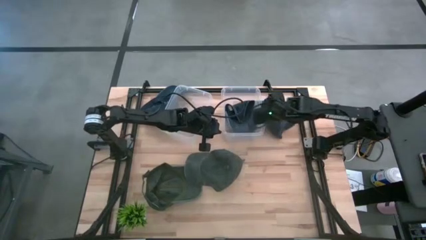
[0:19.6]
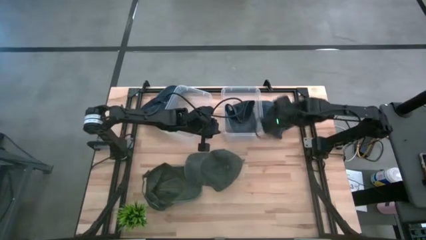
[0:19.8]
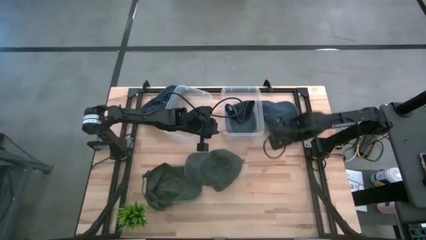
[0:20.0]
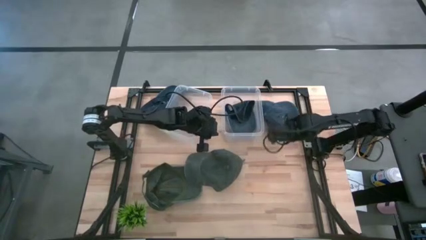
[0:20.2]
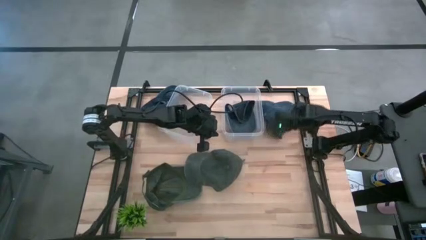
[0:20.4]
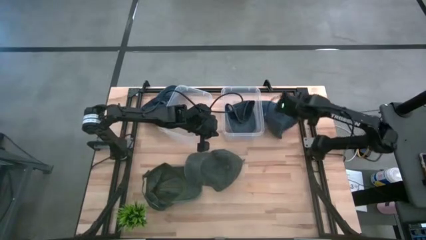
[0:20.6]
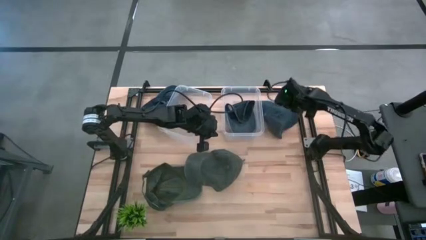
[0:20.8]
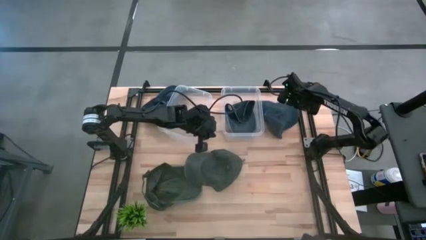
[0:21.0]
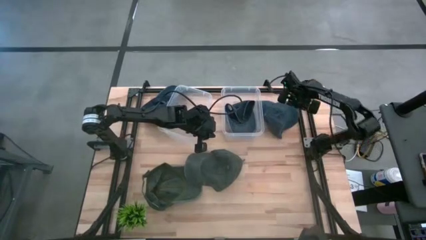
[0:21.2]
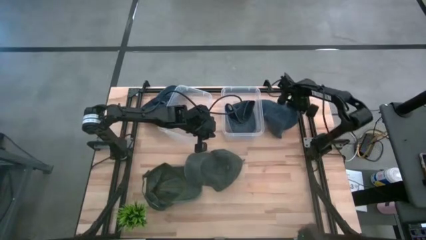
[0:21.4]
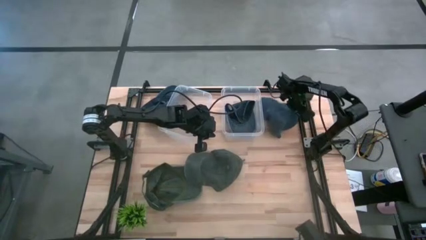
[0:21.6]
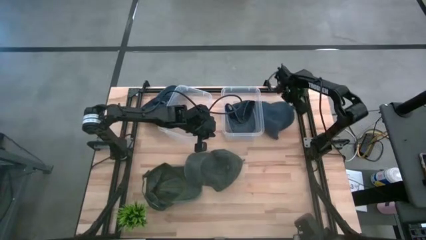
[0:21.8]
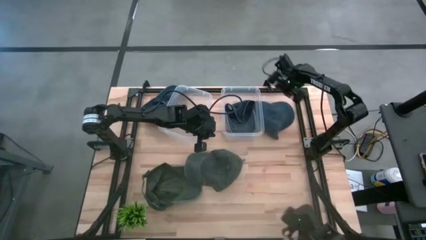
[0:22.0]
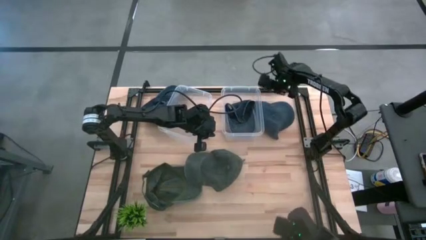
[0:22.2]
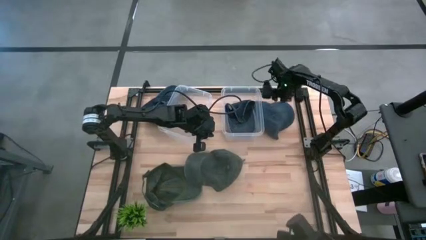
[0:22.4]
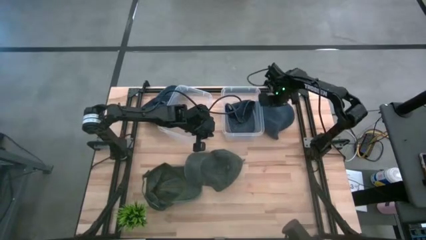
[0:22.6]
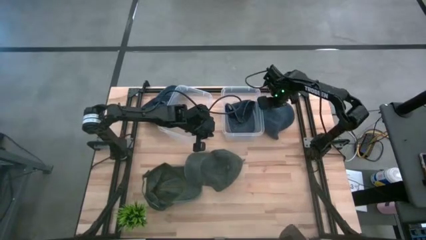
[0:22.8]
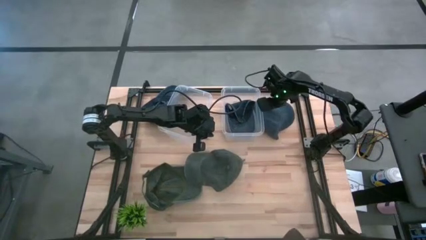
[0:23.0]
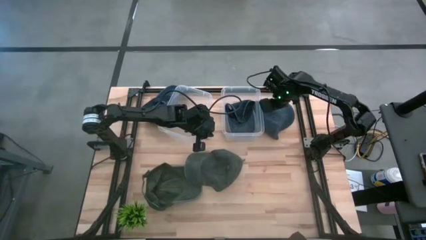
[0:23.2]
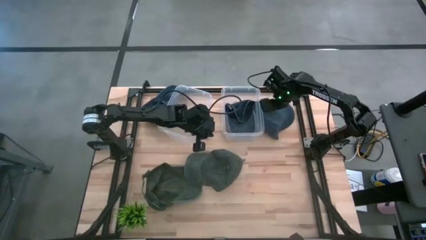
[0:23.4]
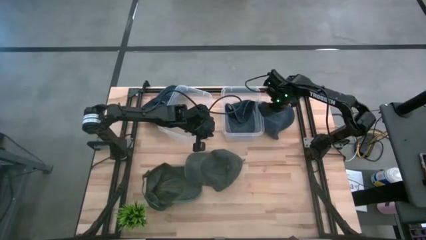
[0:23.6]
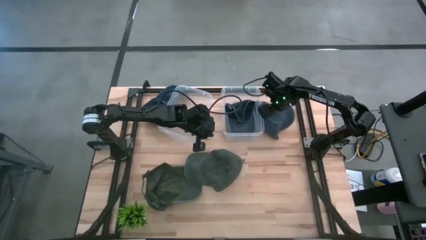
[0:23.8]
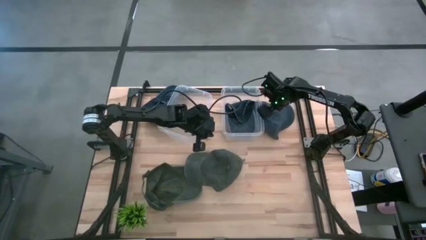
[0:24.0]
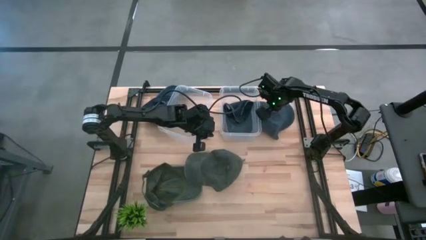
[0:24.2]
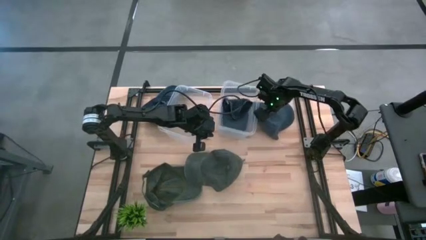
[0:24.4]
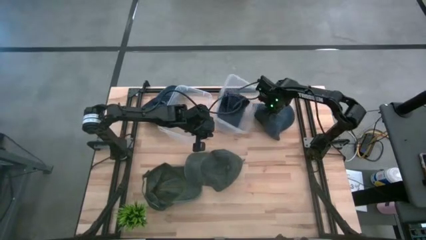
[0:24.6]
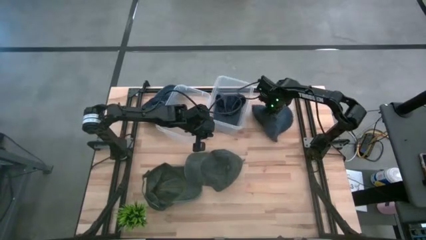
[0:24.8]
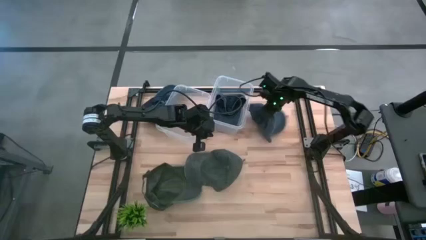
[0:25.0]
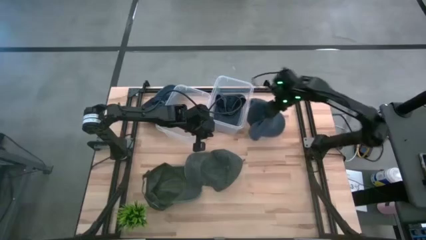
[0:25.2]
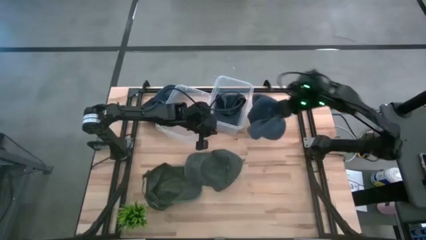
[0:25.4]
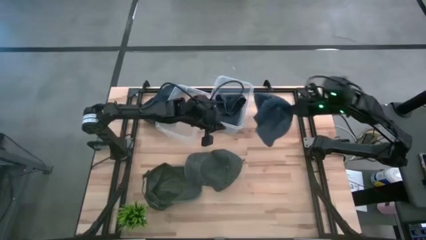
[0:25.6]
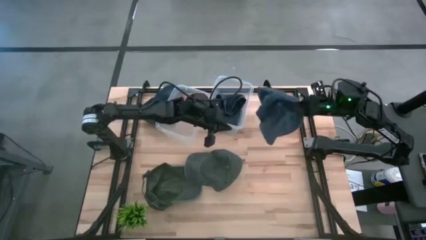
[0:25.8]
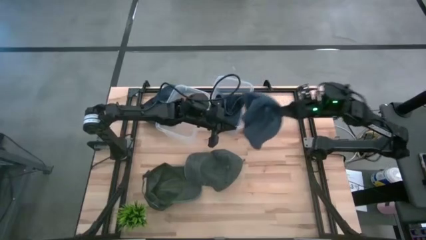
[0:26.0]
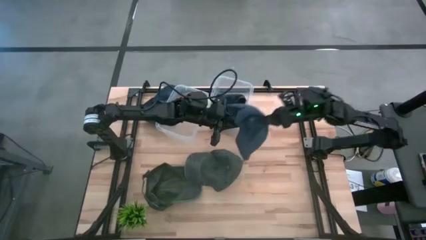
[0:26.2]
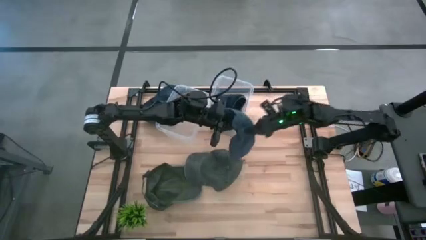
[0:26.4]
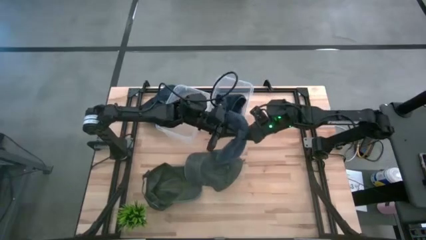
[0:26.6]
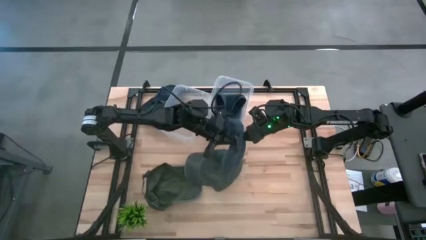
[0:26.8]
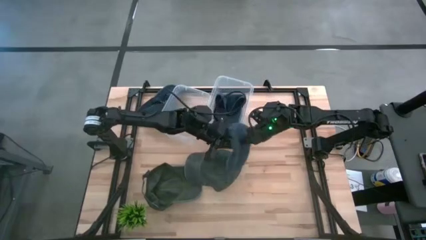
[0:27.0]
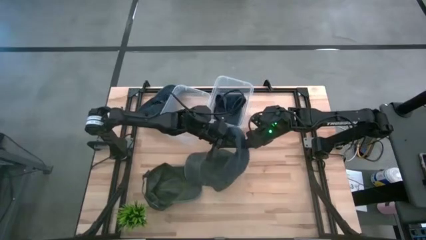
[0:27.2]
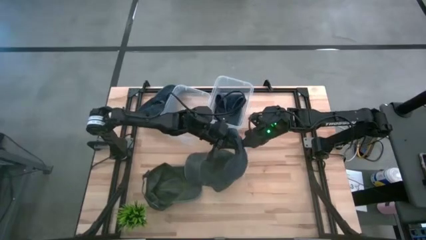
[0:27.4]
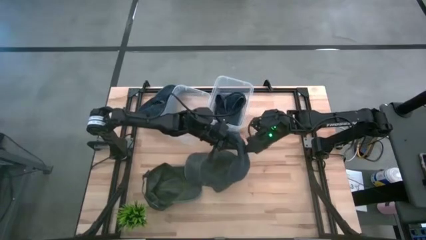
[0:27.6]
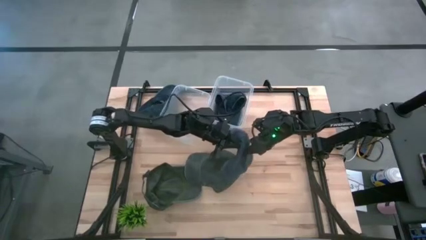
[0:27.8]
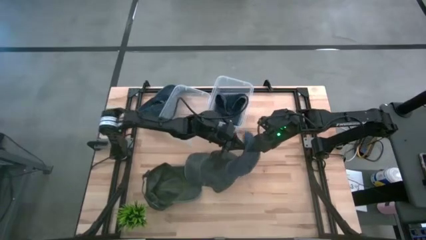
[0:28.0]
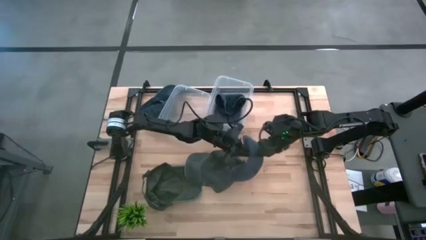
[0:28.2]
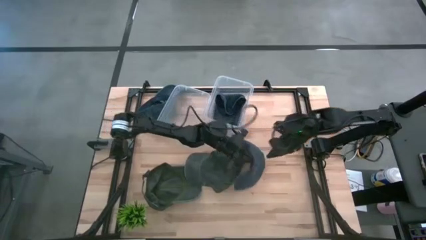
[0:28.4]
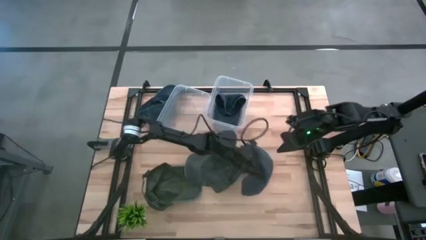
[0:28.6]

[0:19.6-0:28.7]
Task: Pick & Place hat
Put the right blue cap into the right transparent bin

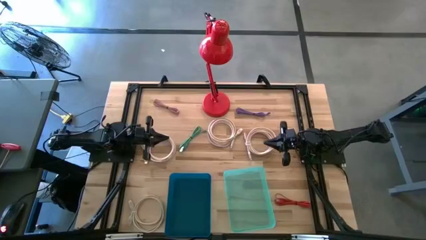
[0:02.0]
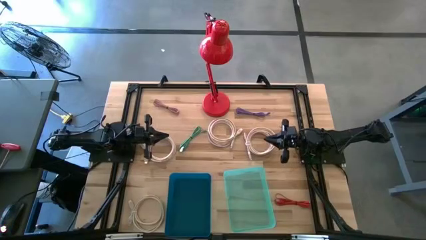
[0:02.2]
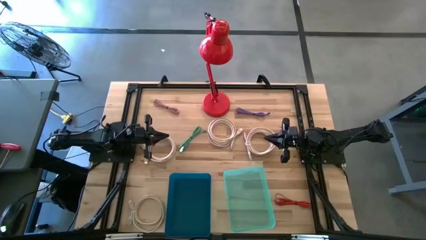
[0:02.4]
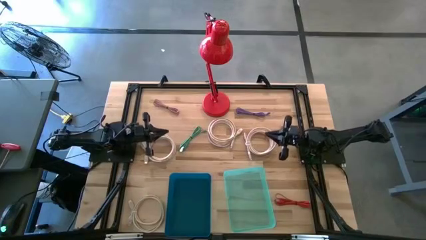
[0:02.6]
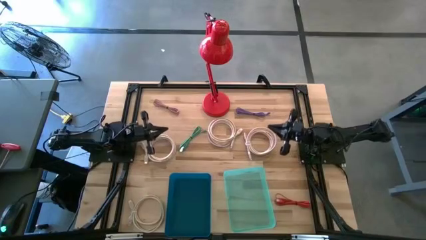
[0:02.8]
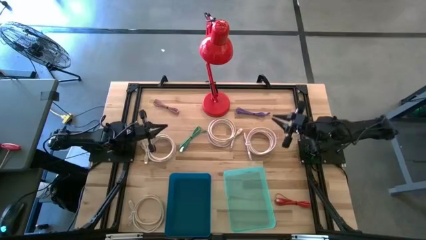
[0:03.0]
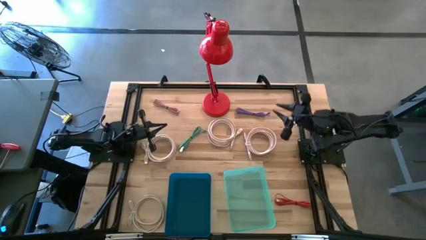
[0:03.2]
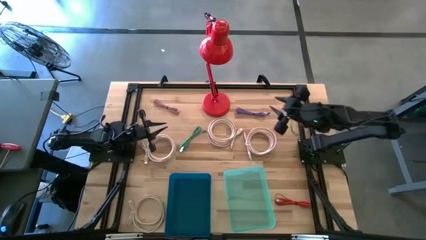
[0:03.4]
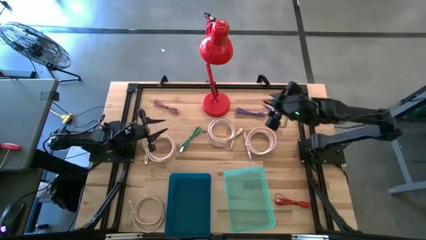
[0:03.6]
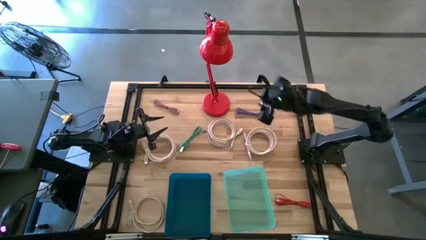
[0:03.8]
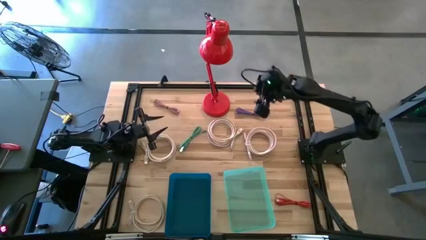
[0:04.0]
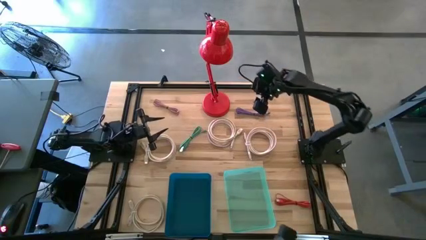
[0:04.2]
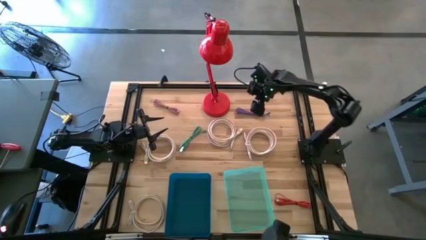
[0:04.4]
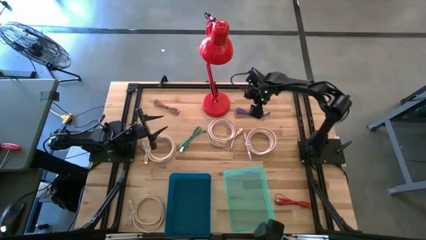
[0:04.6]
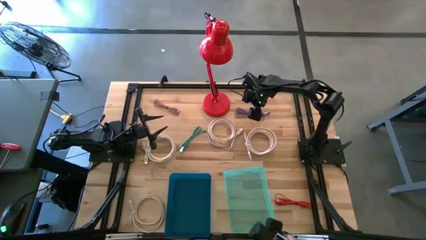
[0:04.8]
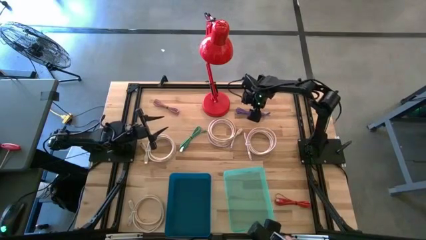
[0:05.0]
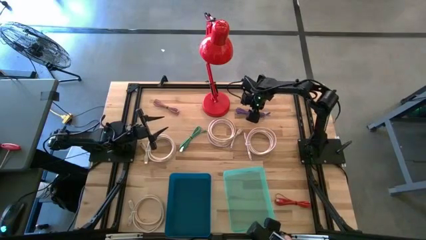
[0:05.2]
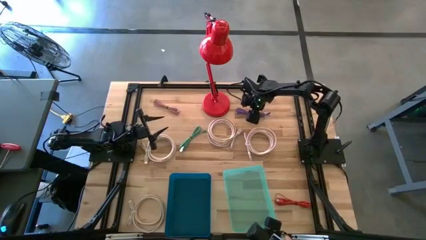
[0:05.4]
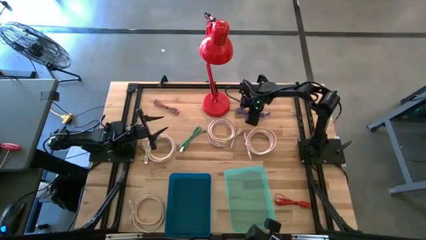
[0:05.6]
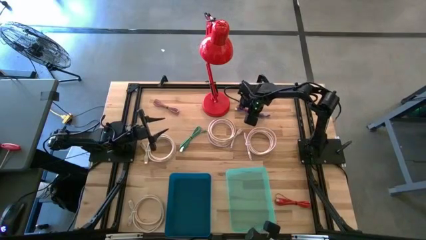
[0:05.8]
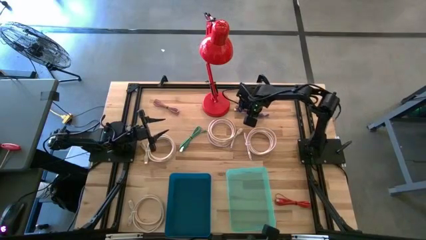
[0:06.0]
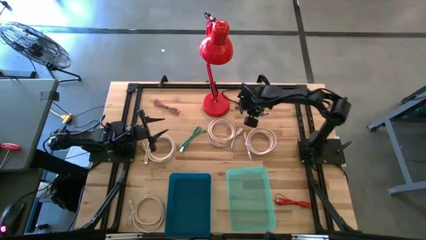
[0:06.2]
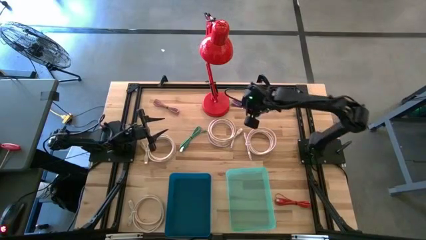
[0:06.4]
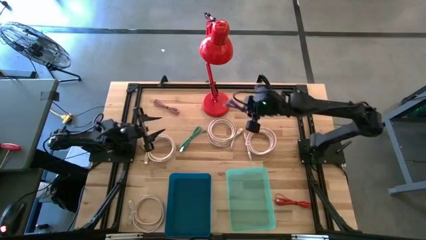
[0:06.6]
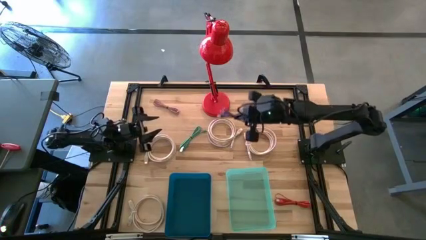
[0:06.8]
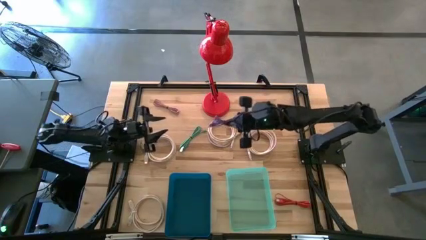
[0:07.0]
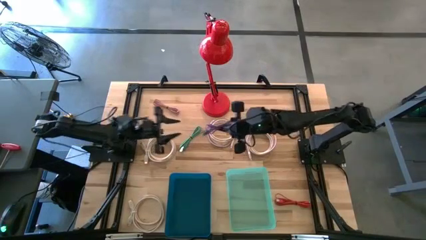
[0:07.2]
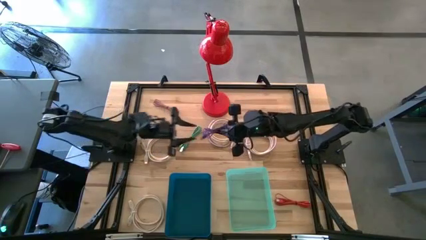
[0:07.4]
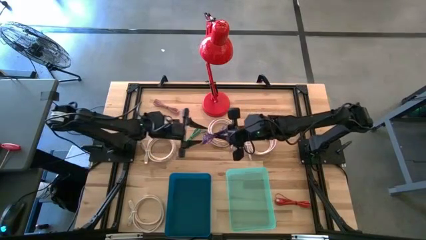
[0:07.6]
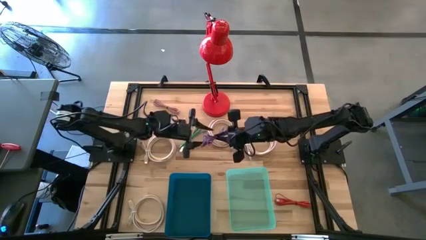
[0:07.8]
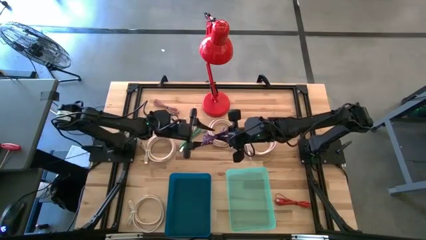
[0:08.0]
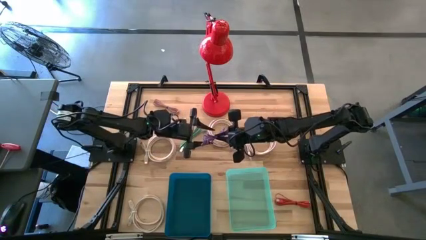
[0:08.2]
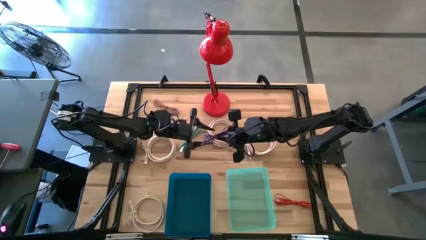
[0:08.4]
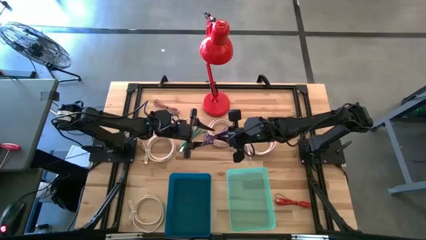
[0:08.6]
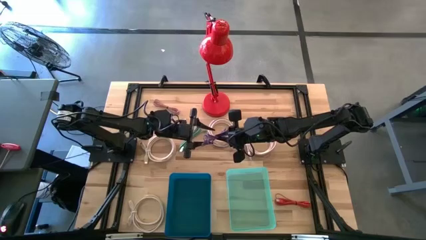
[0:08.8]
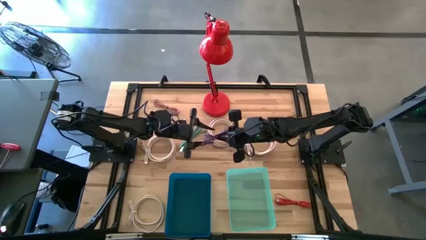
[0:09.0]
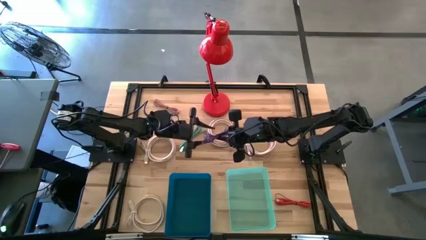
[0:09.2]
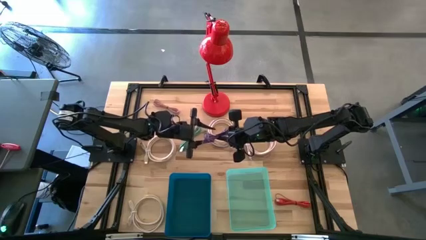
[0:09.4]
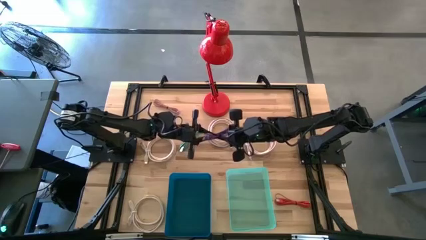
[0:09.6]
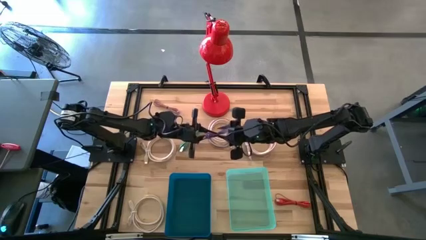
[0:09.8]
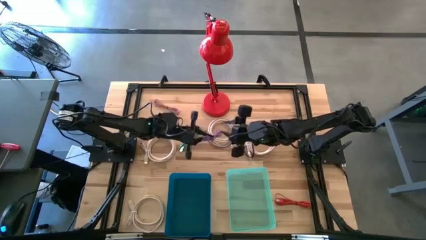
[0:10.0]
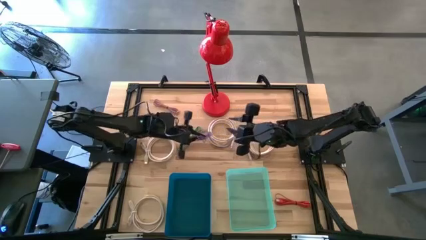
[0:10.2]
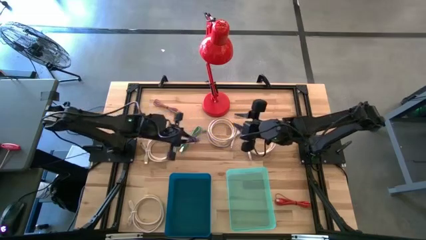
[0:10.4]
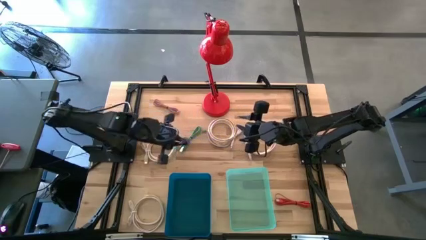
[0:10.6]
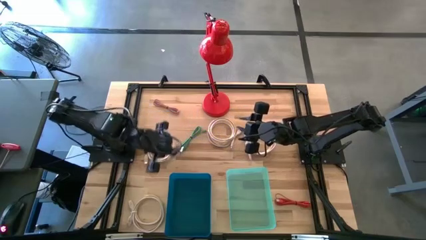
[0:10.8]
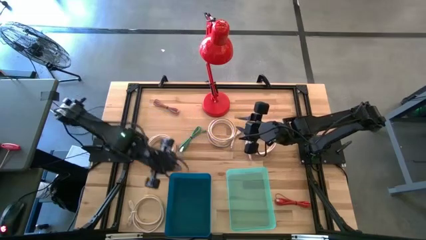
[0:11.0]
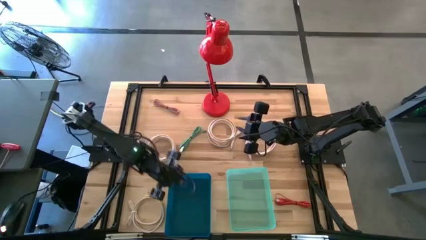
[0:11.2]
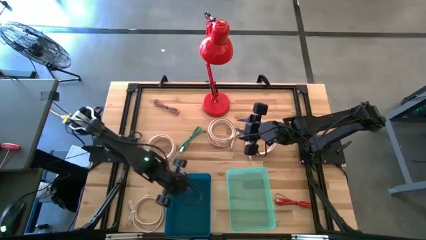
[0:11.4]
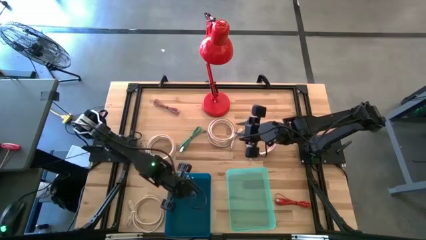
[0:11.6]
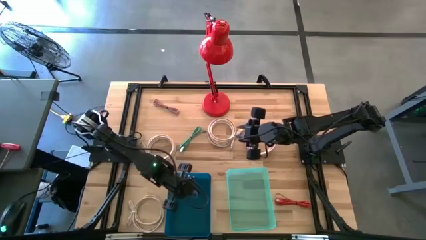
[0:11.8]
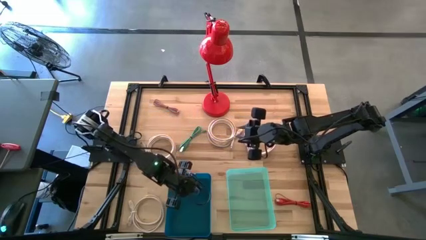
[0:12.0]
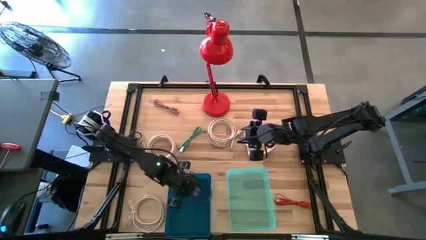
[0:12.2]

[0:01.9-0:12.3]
Task: Pick & Place USB Port
Put the purple charger cable into the blue bin
